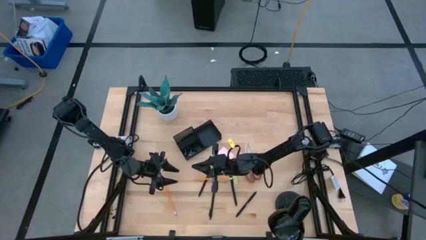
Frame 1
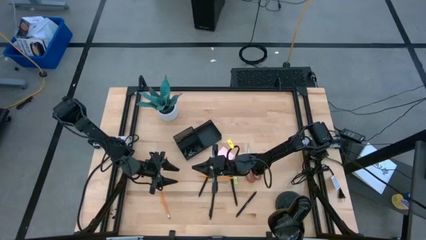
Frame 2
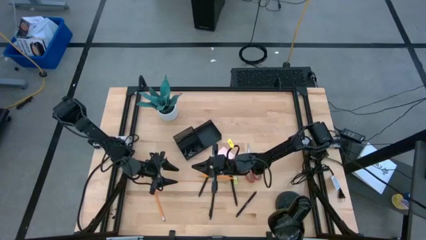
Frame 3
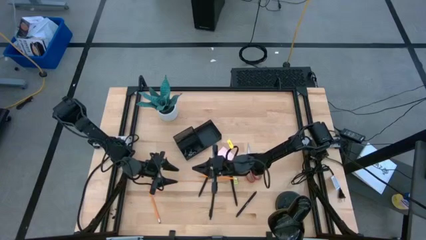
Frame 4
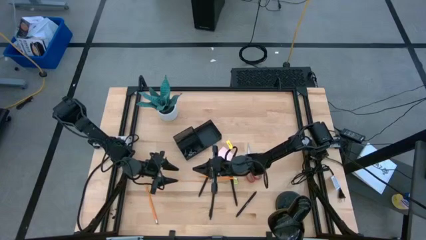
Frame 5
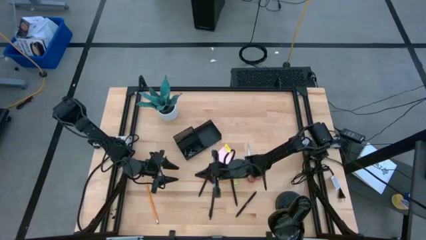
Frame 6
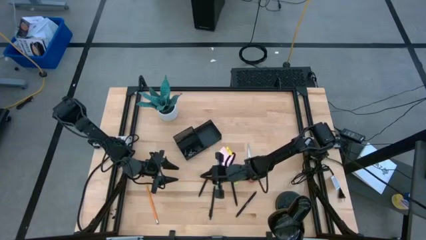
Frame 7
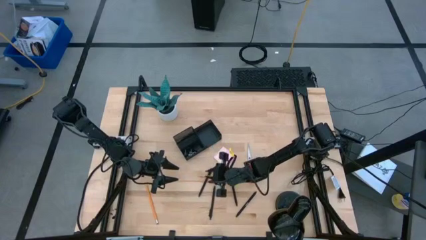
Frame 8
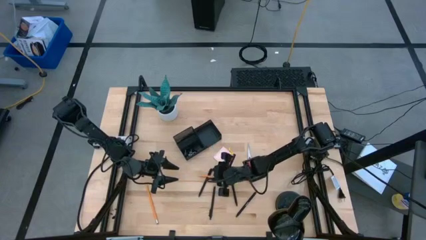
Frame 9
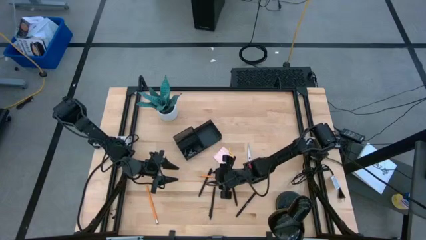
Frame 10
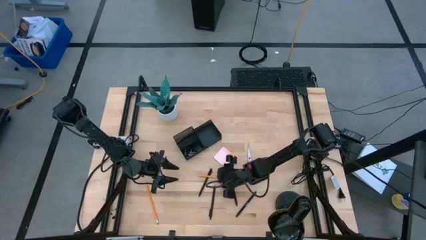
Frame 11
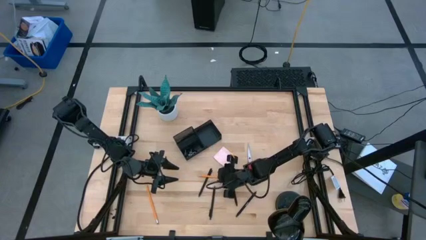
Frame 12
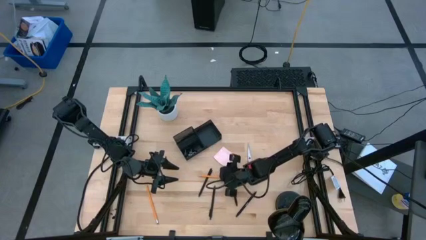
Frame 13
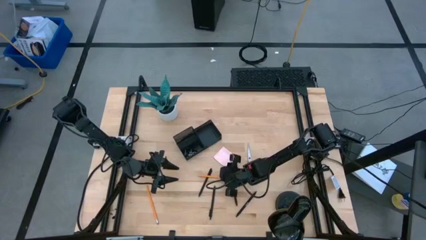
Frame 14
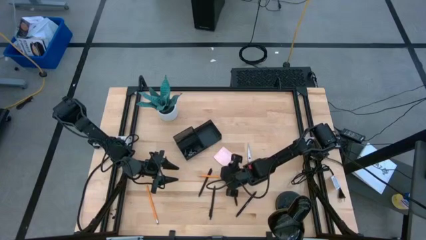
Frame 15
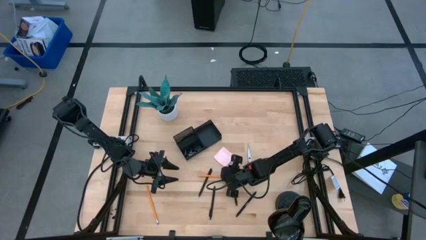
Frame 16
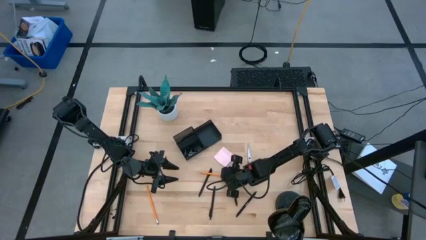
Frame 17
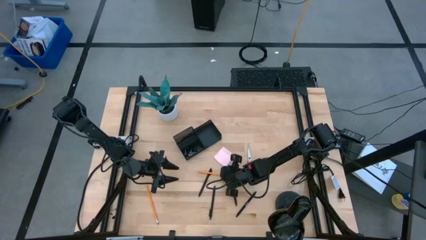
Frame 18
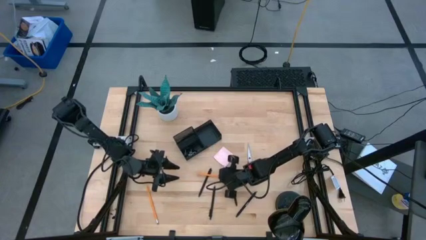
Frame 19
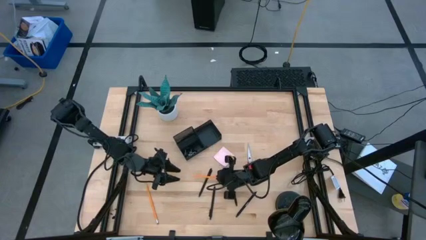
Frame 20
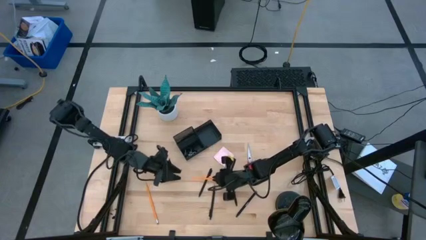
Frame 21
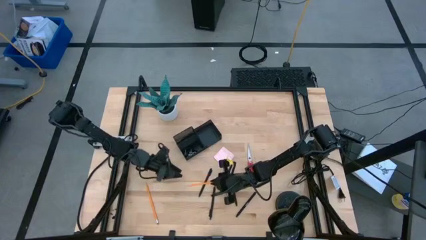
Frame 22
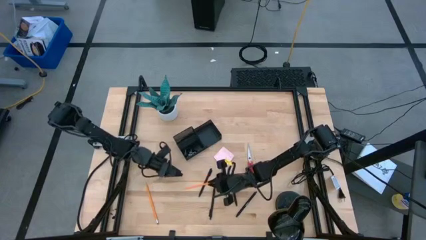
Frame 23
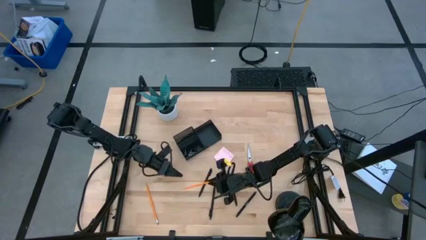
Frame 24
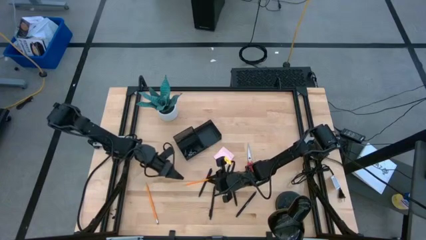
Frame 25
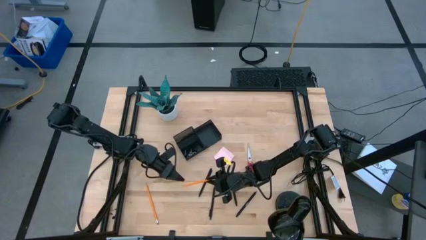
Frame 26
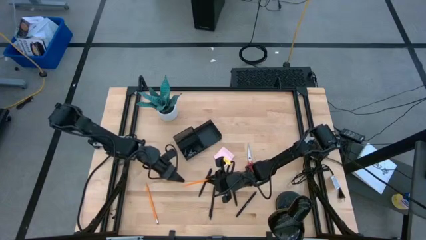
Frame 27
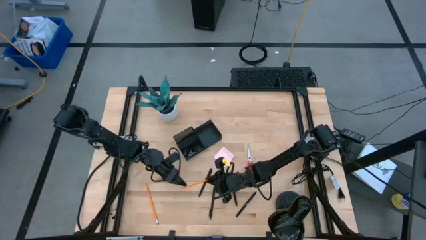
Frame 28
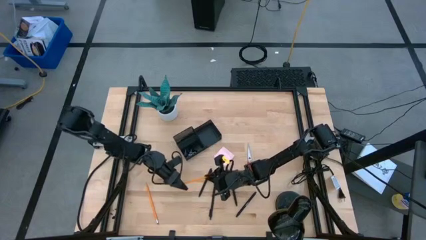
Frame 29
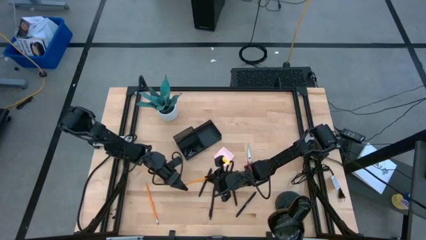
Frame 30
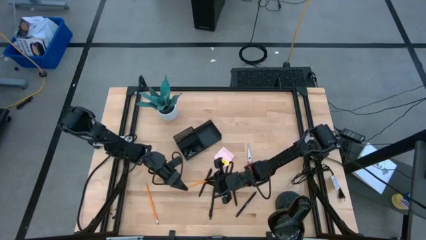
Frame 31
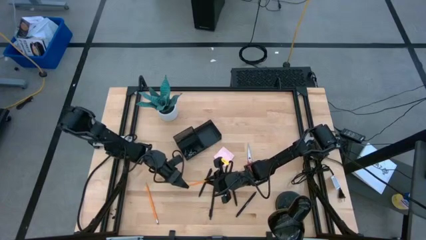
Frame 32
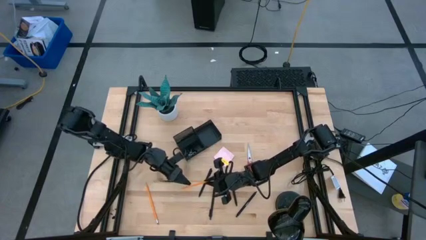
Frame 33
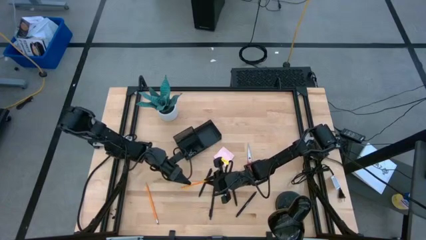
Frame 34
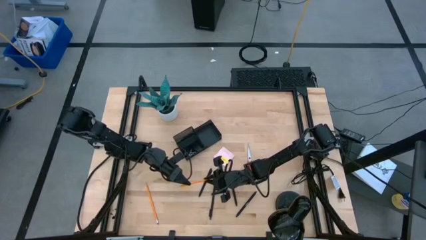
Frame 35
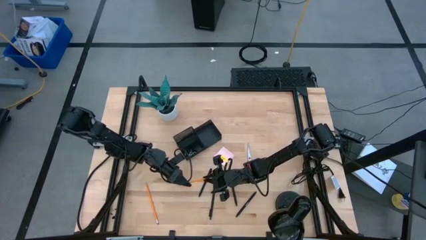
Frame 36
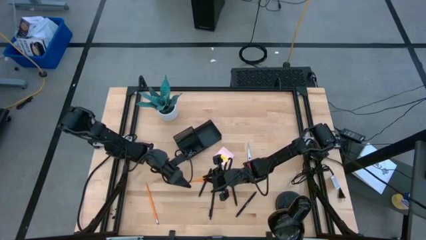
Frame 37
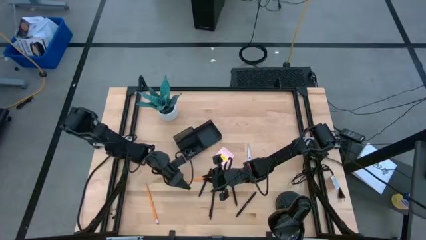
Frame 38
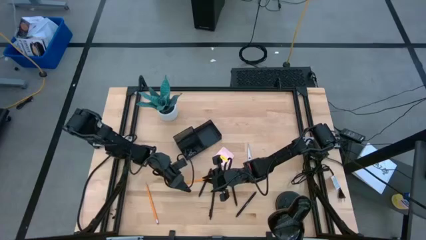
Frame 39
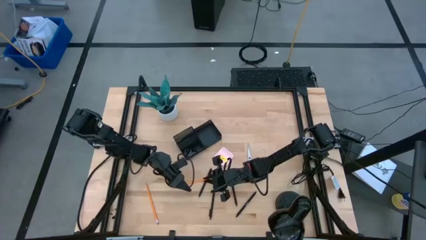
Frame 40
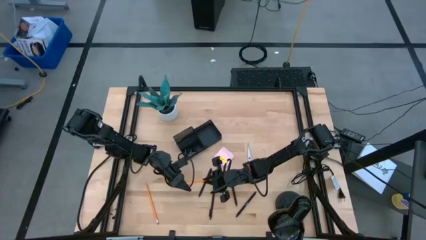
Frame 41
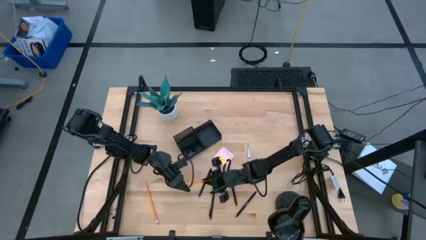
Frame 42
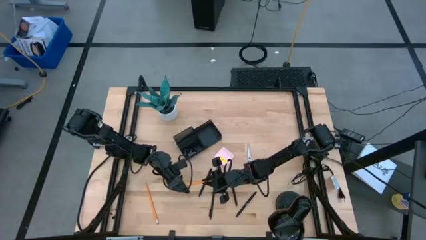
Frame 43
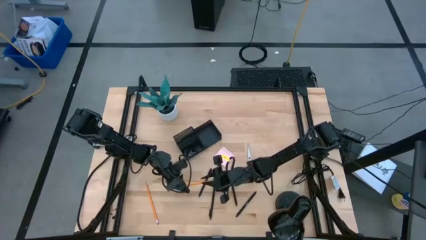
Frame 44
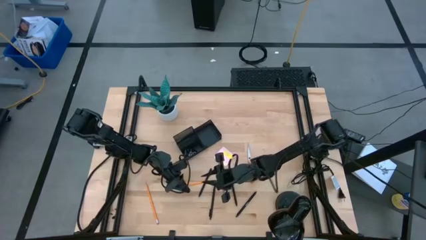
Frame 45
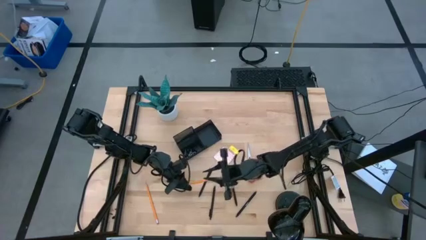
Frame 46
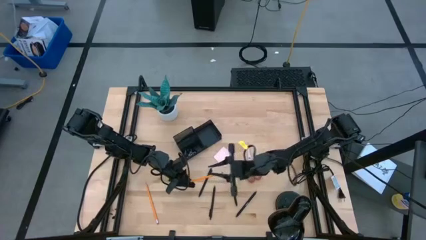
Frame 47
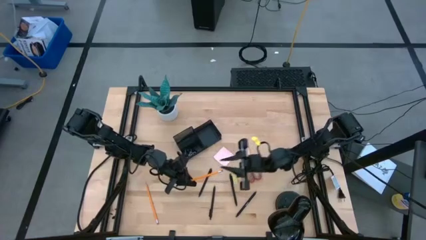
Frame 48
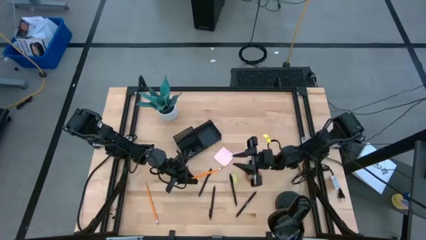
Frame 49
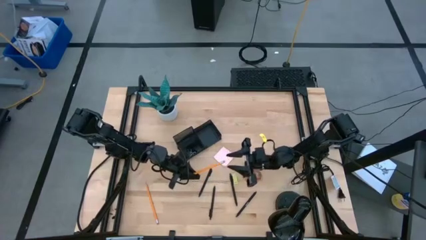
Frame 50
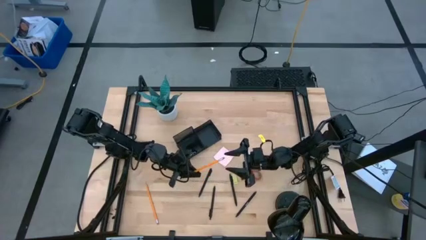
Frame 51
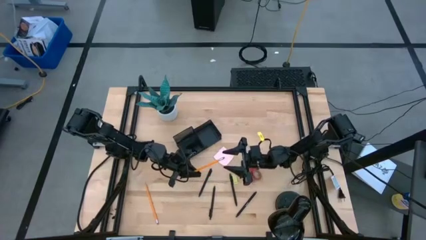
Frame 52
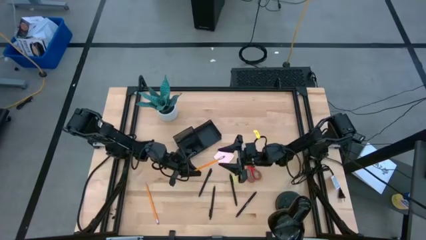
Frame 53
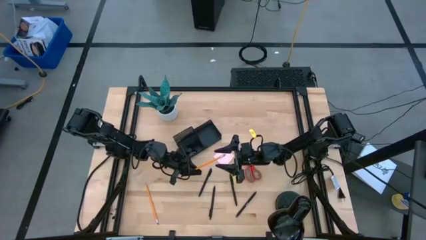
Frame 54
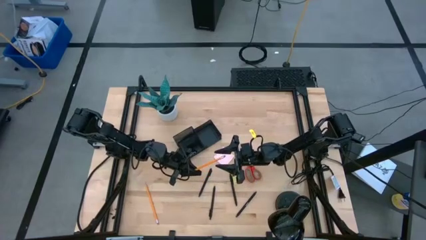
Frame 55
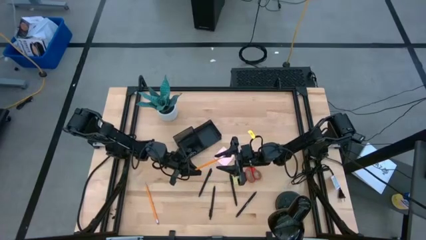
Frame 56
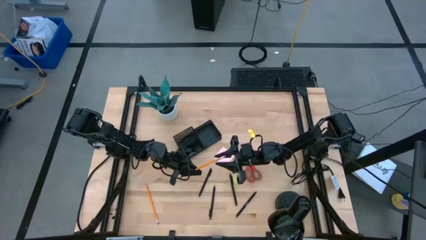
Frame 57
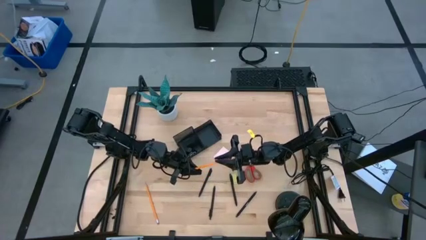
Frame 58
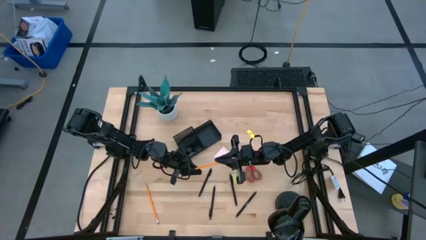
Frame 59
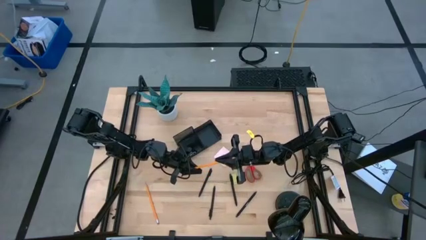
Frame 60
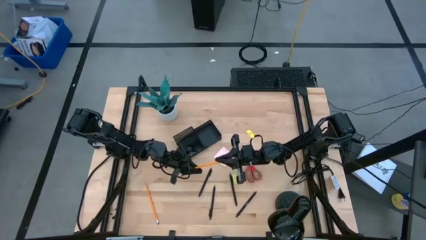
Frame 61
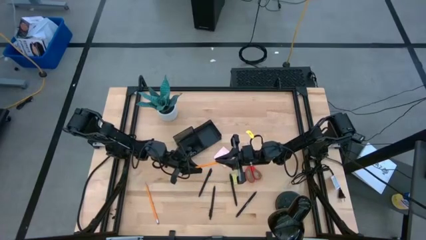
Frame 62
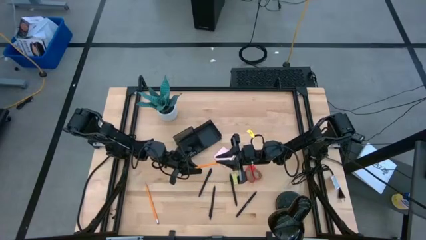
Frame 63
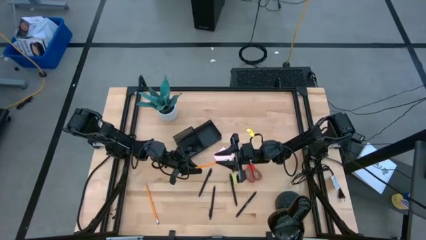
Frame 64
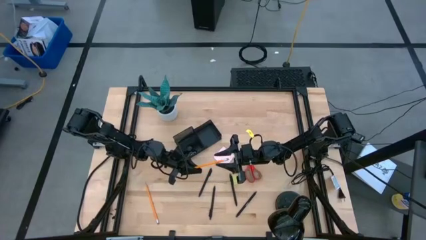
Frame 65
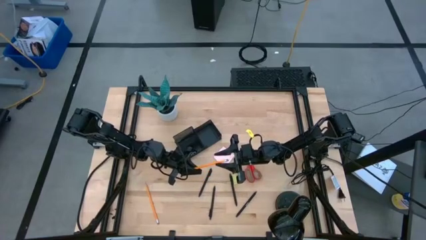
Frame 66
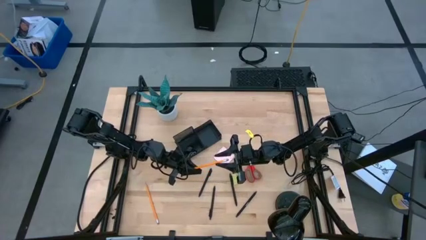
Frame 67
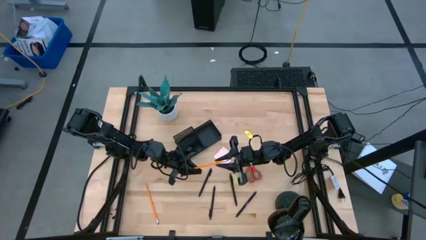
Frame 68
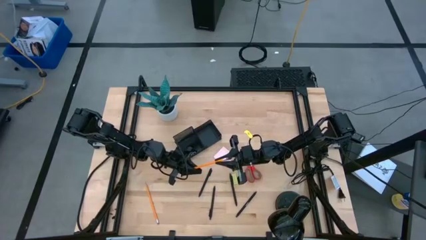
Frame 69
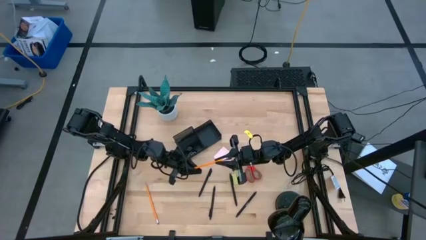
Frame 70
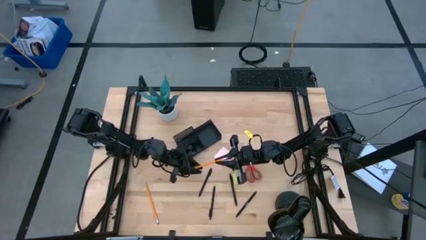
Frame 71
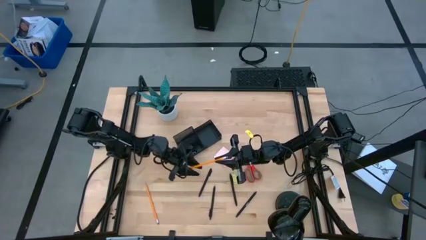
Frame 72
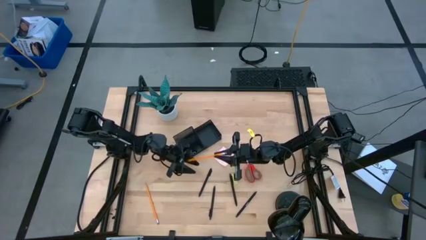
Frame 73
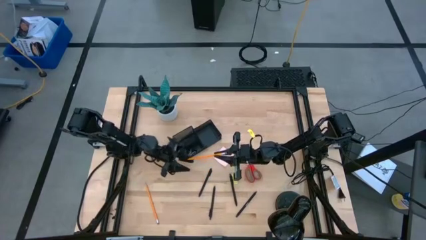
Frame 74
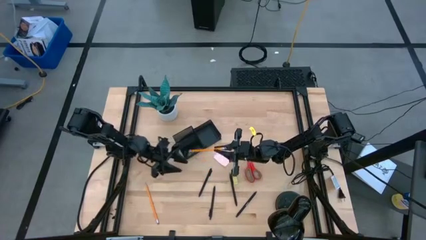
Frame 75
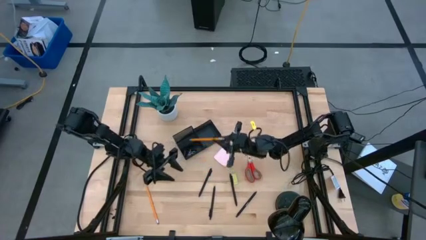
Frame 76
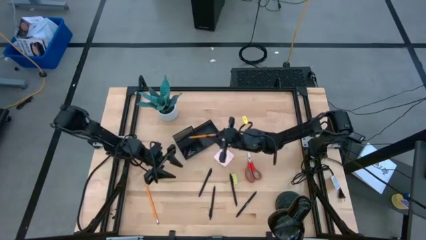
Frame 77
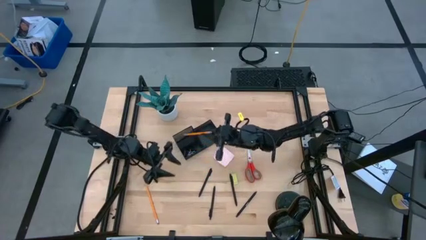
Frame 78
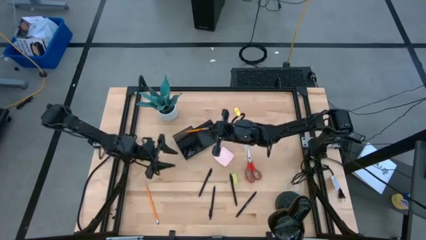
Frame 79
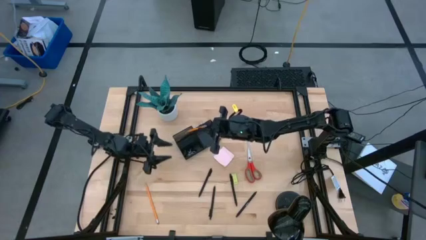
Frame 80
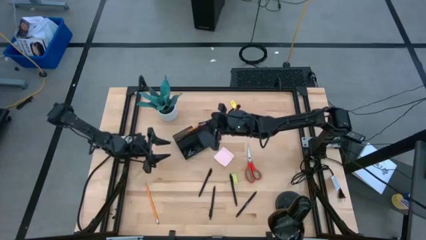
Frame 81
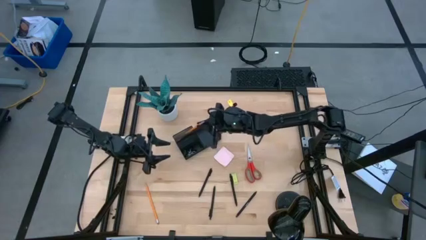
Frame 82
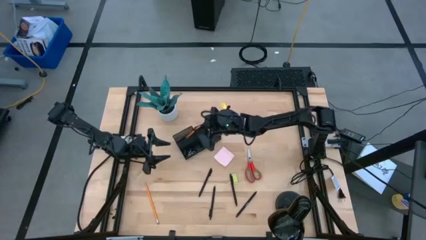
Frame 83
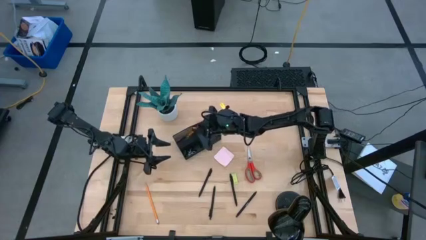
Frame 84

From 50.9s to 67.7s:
Task: Pick and place office supplies into organizer
Put the orange pencil into the black desk organizer

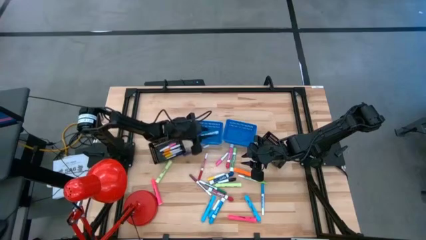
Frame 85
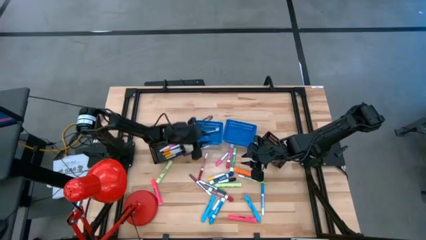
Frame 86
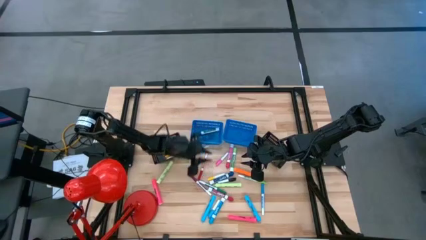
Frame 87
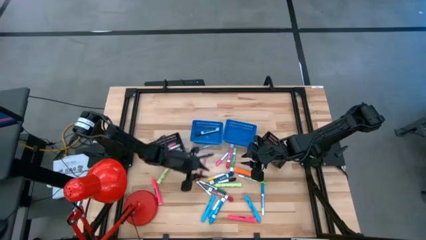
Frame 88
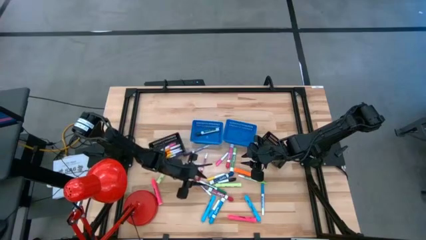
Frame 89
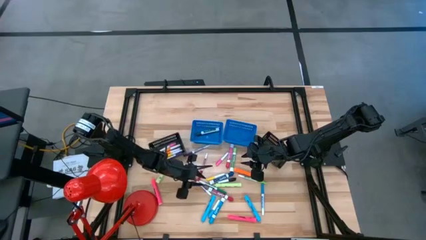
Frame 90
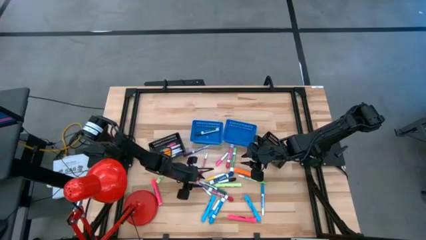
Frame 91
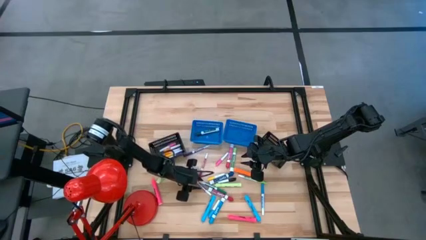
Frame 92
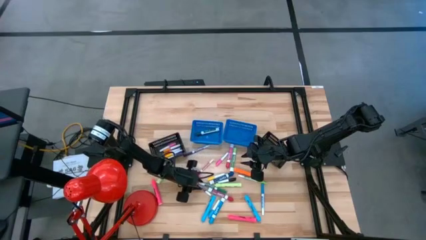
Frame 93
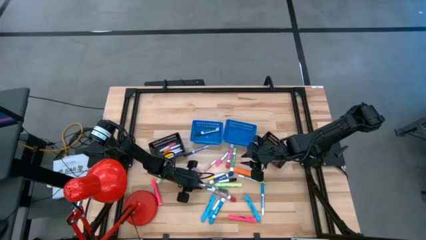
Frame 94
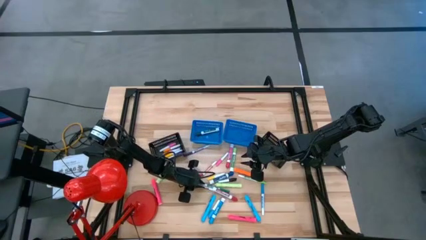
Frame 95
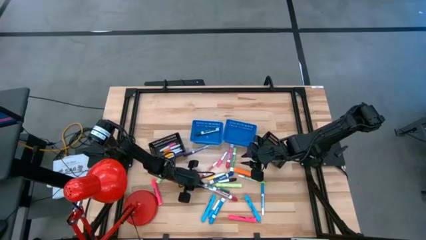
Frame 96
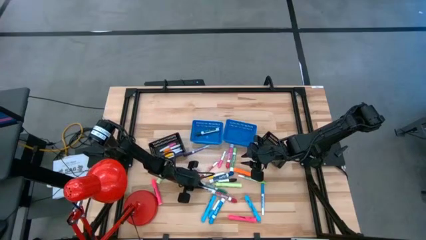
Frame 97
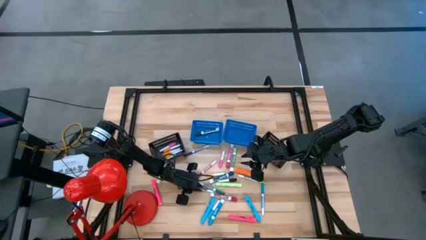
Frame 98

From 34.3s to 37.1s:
Task: Pick & Place Markers
Put the purple alcohol marker into the right blue bin
